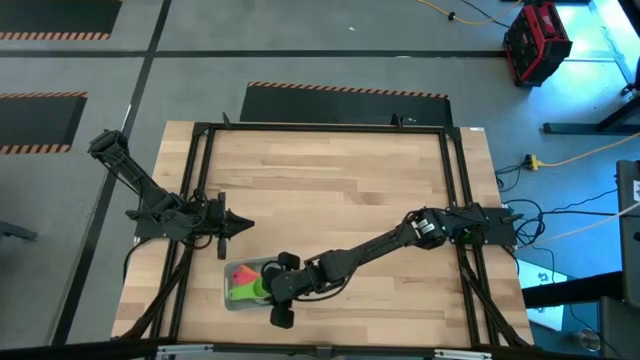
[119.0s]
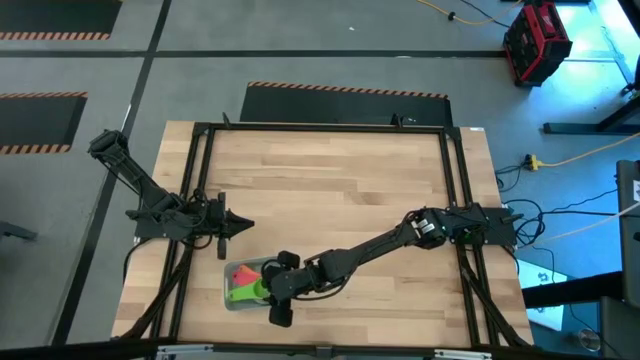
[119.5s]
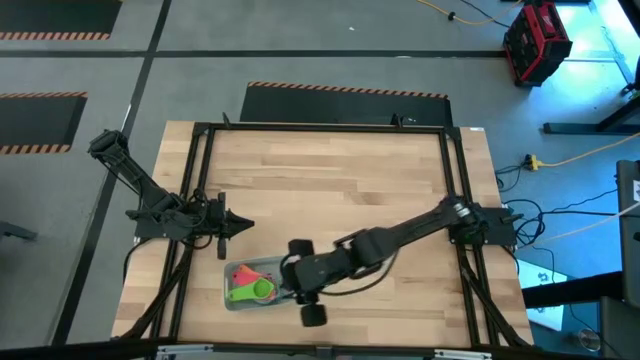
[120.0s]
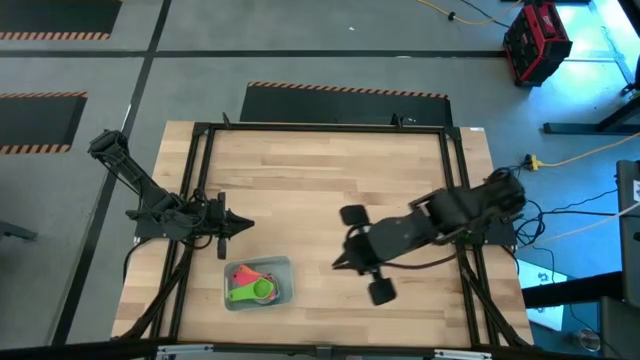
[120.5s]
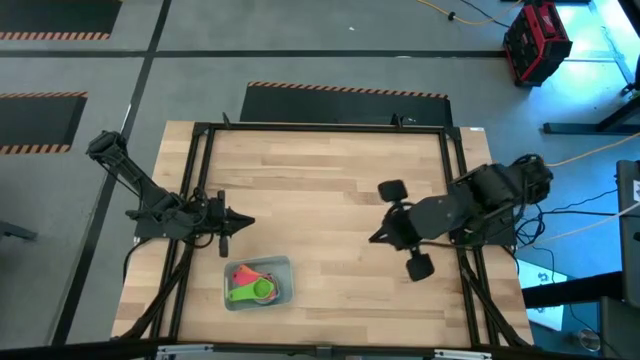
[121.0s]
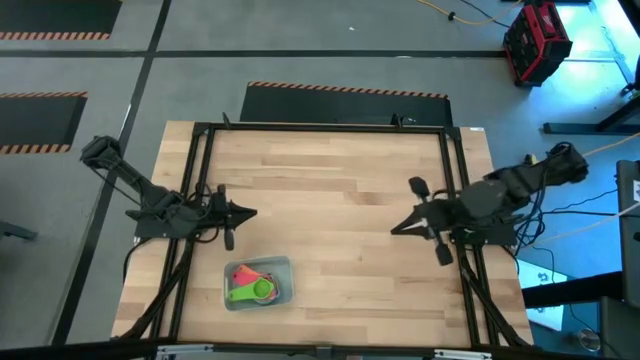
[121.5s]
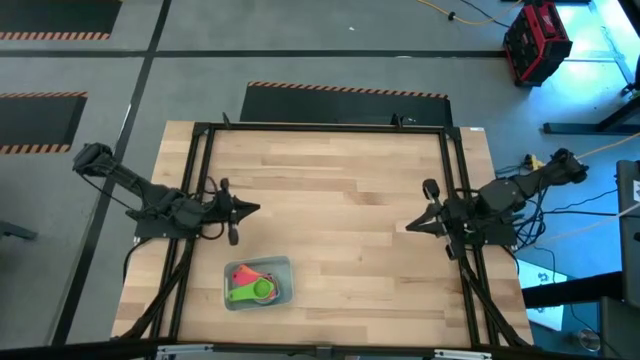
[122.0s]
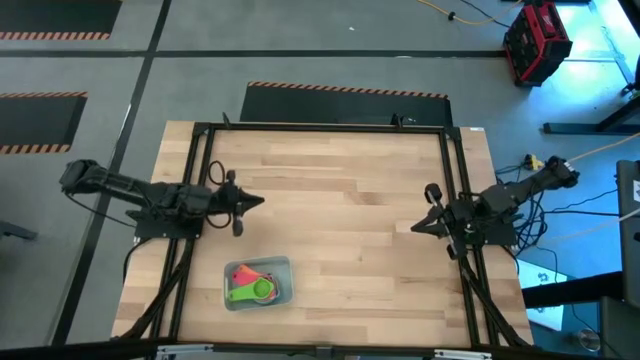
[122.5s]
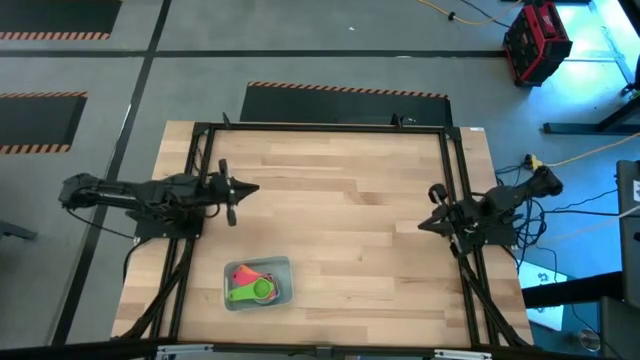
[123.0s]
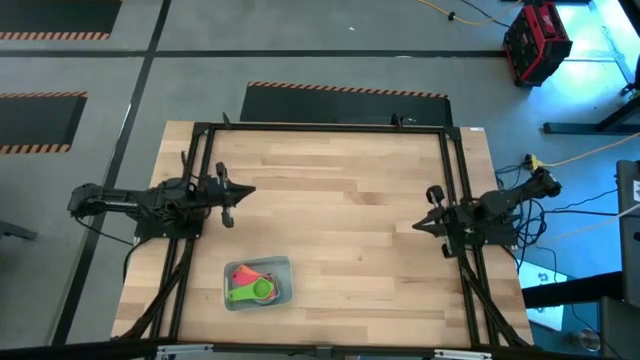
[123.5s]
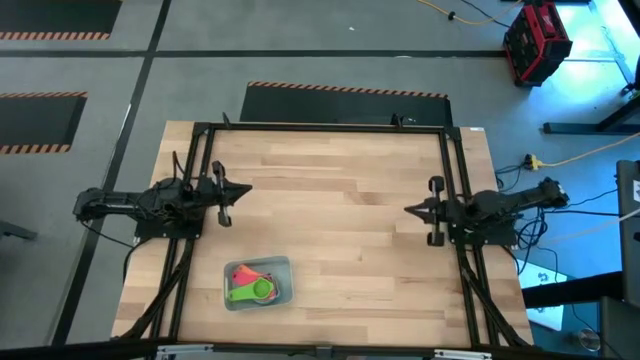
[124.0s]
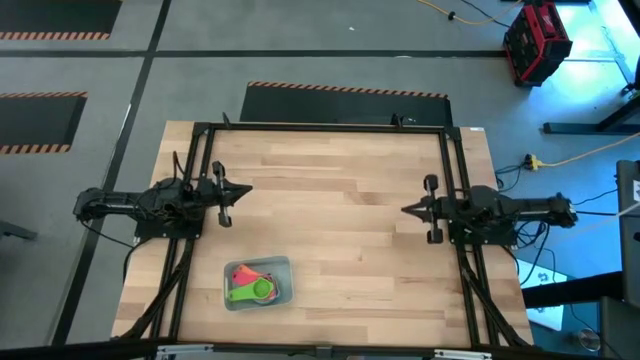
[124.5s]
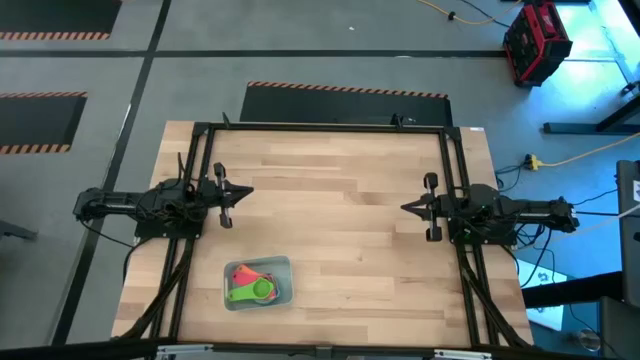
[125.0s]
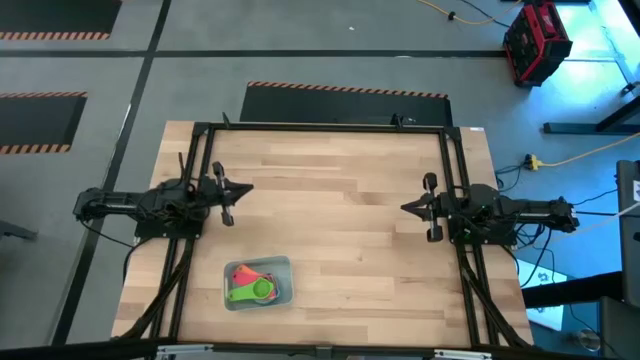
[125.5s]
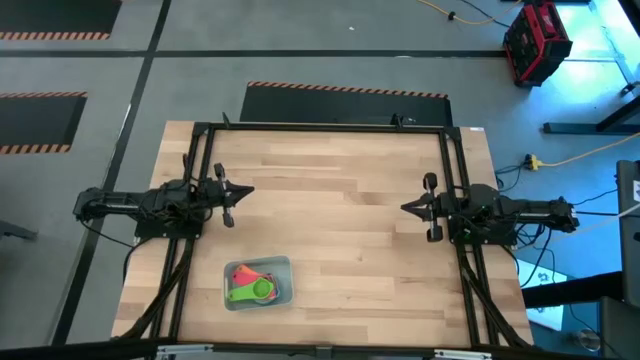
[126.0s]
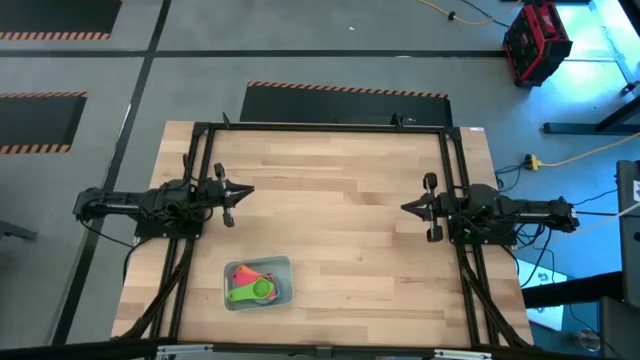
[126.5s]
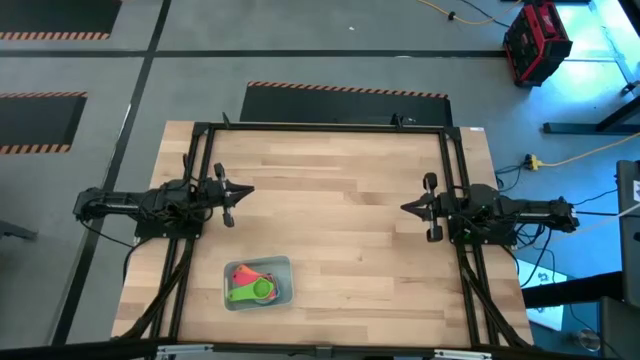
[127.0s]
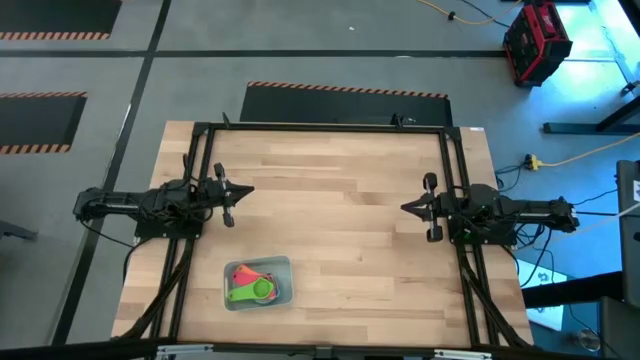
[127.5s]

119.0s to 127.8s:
Task: Nest measuring cups in basket
Return to Home Position

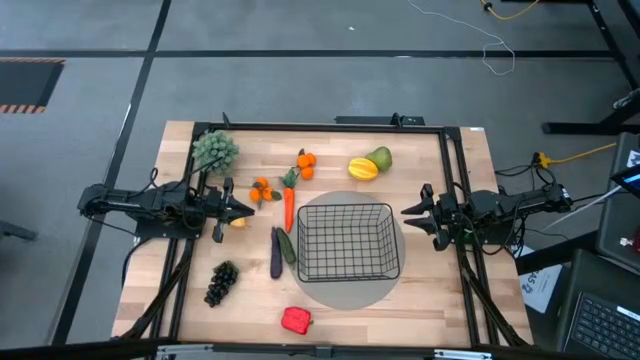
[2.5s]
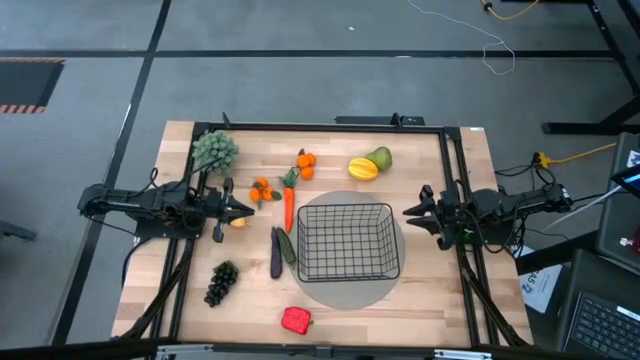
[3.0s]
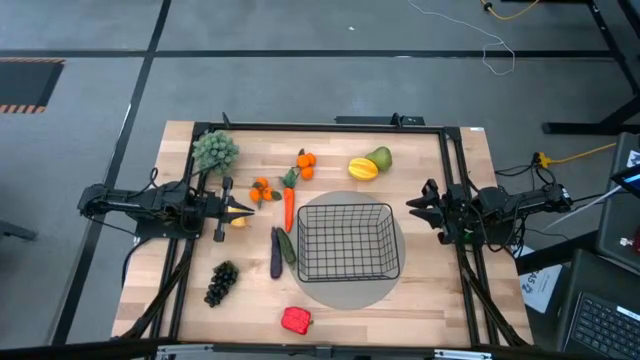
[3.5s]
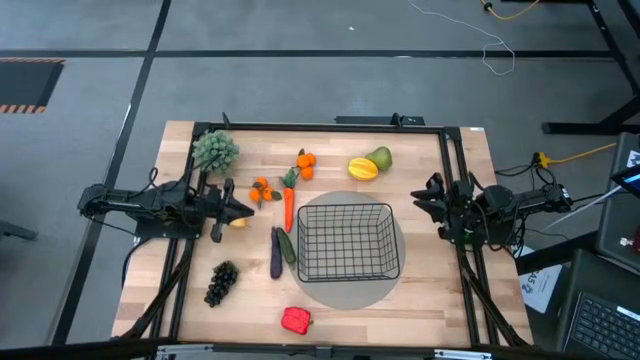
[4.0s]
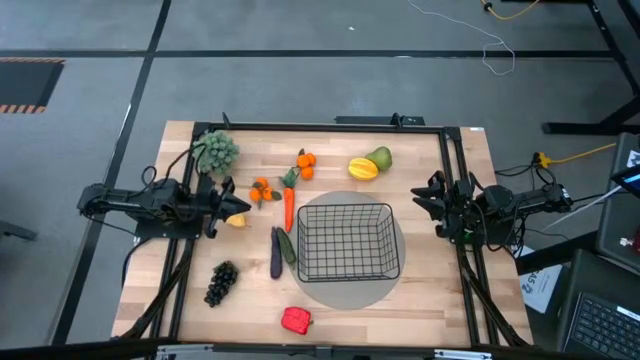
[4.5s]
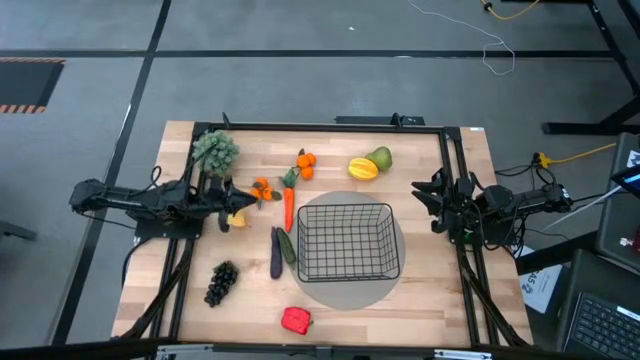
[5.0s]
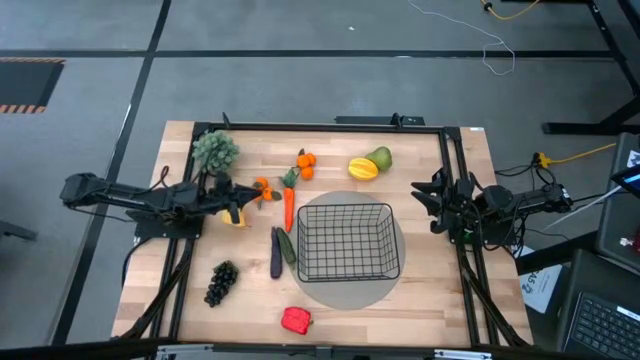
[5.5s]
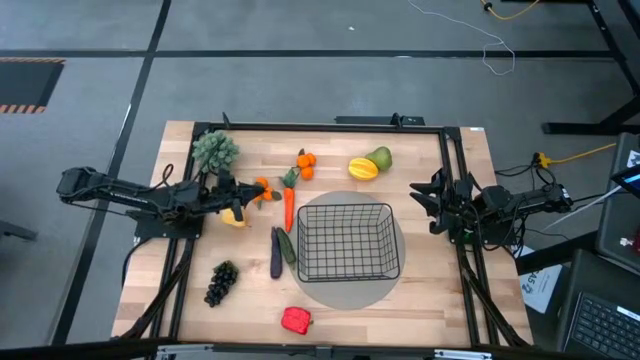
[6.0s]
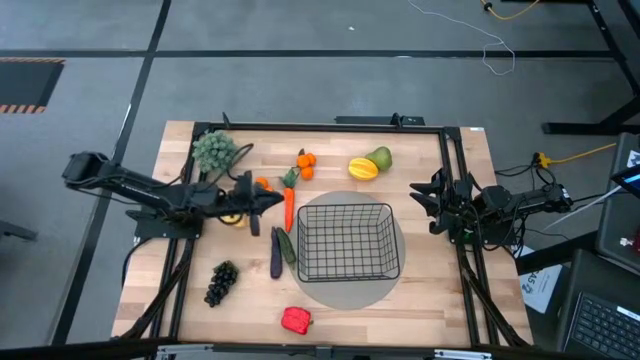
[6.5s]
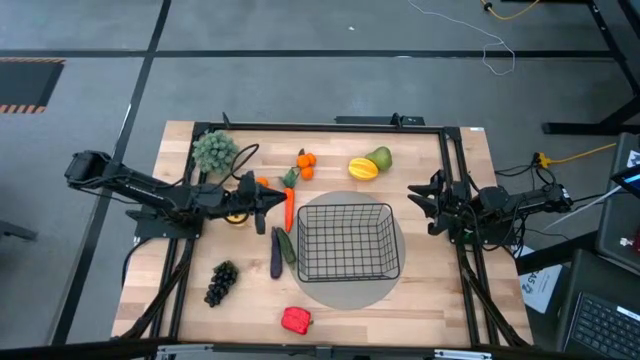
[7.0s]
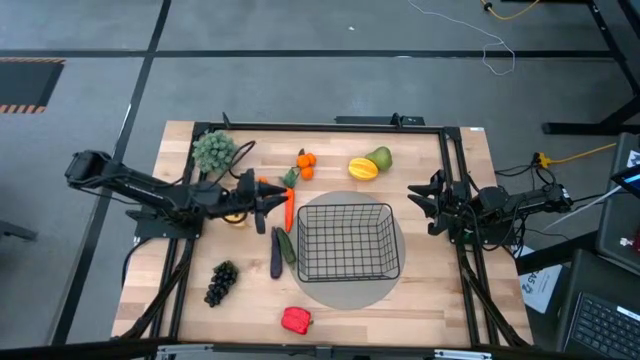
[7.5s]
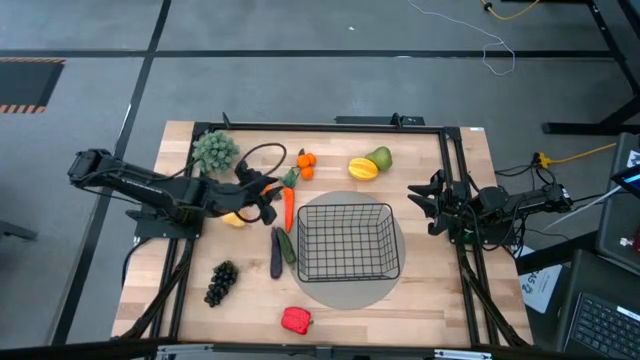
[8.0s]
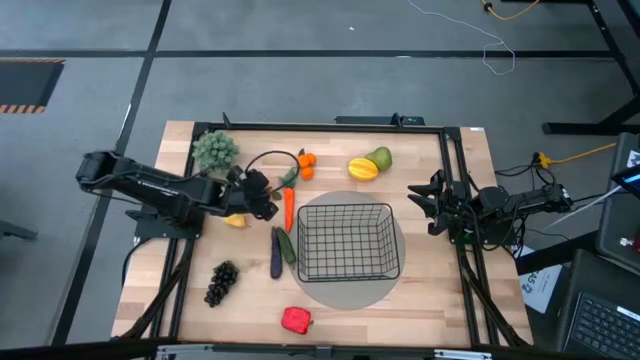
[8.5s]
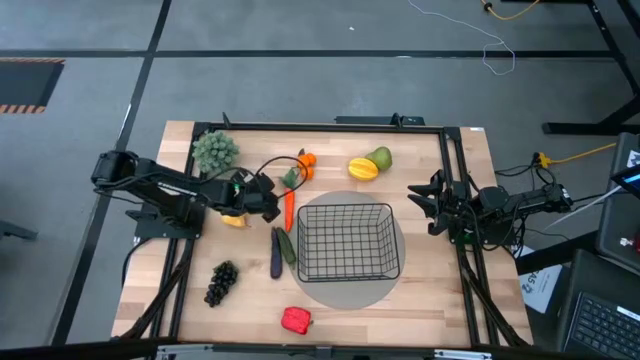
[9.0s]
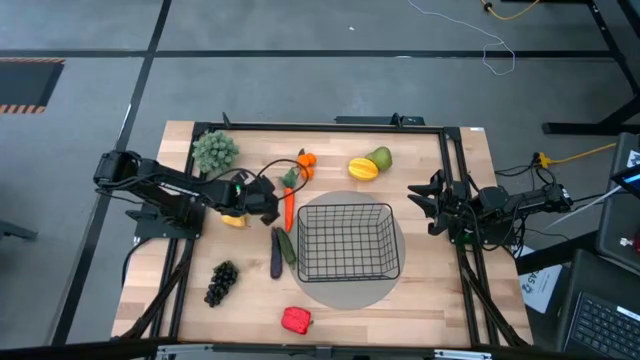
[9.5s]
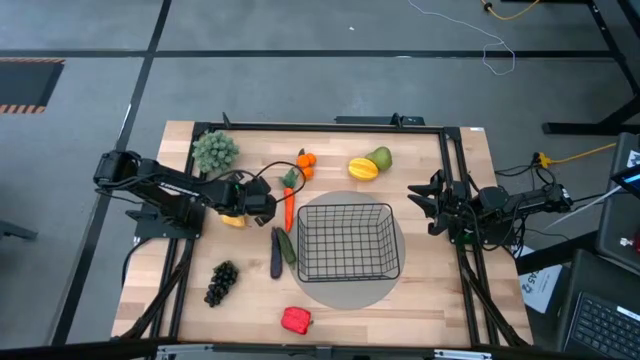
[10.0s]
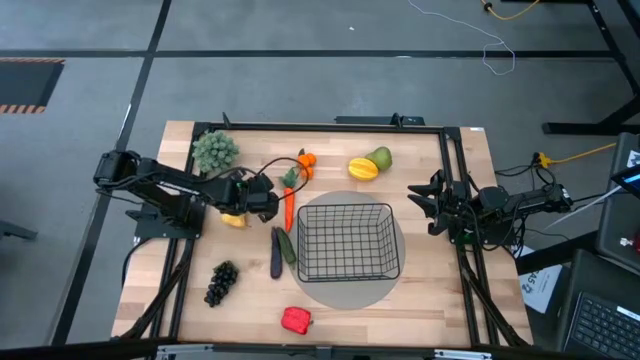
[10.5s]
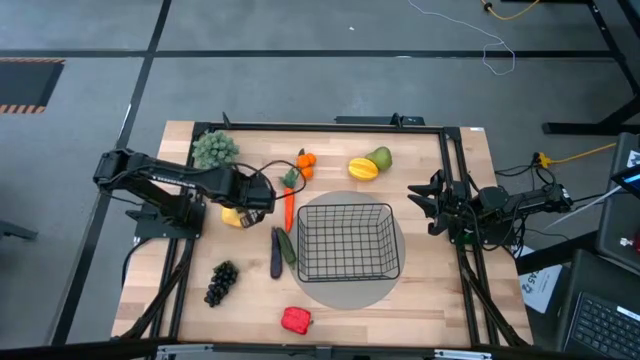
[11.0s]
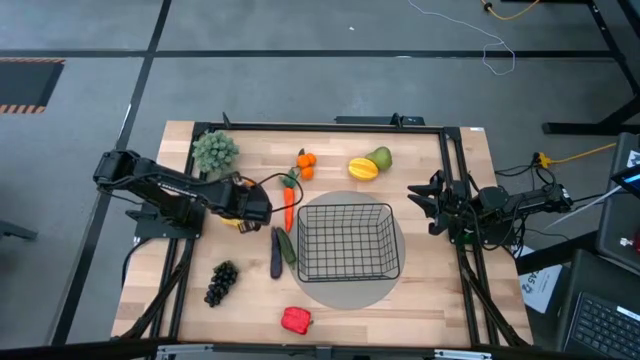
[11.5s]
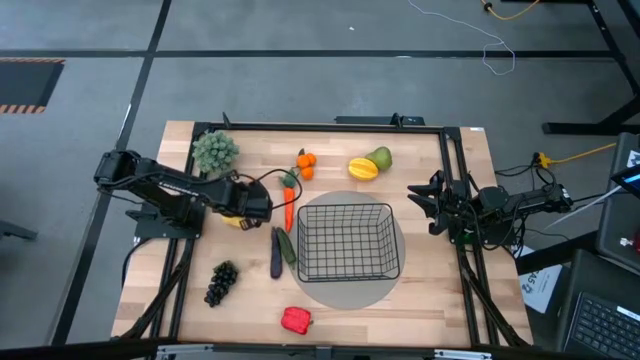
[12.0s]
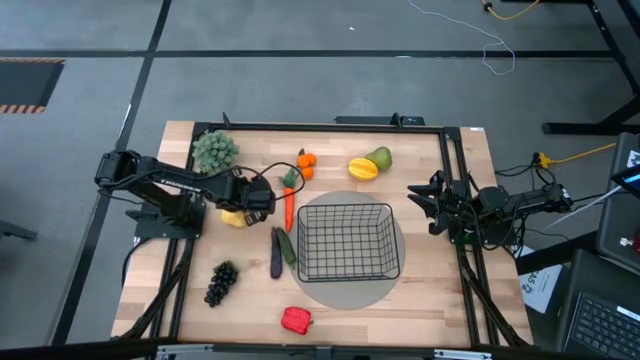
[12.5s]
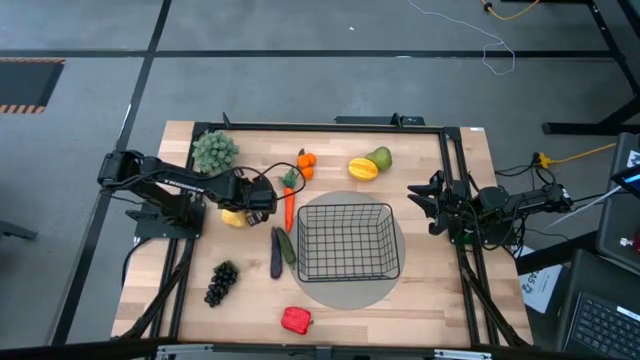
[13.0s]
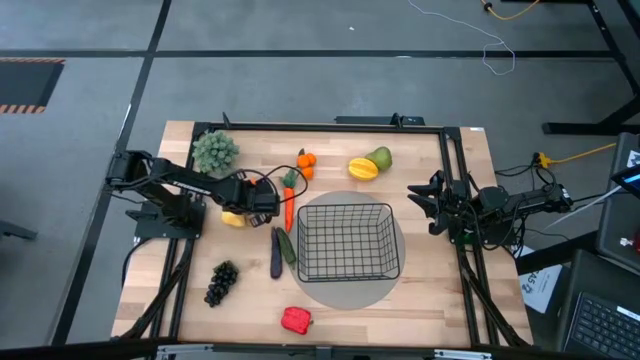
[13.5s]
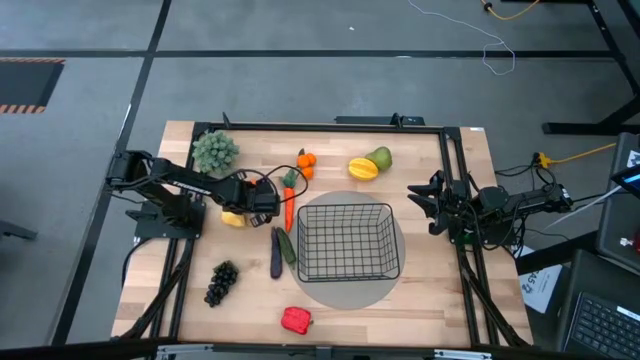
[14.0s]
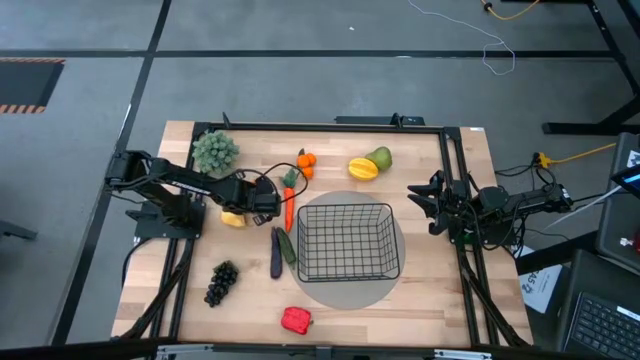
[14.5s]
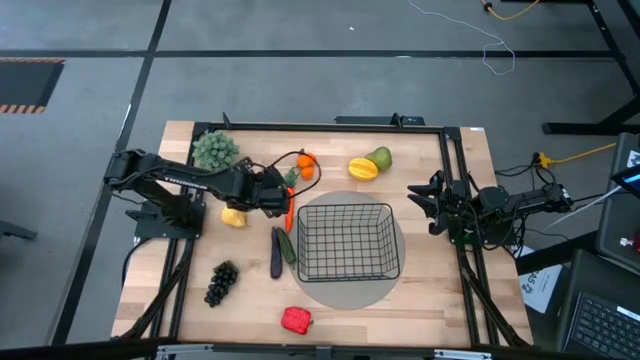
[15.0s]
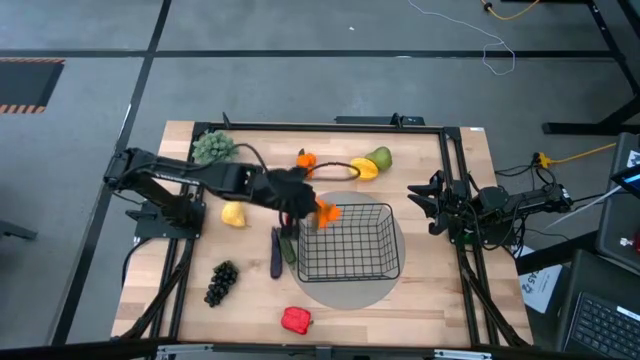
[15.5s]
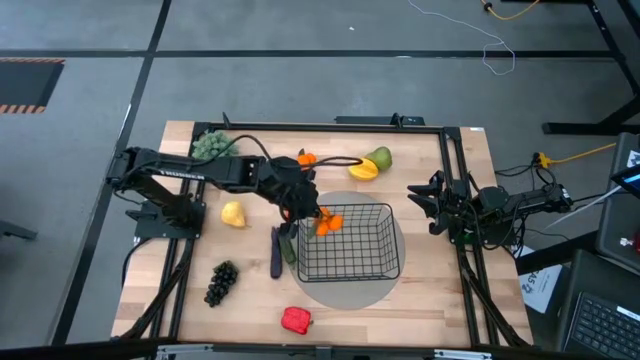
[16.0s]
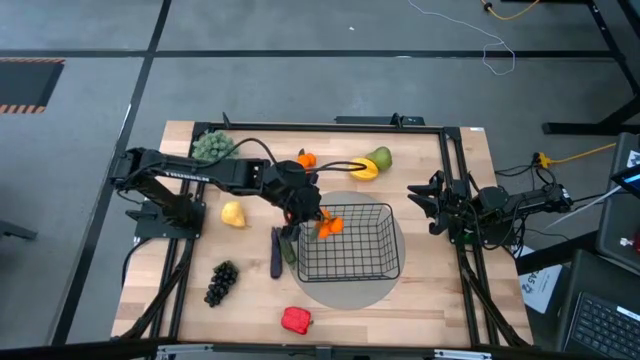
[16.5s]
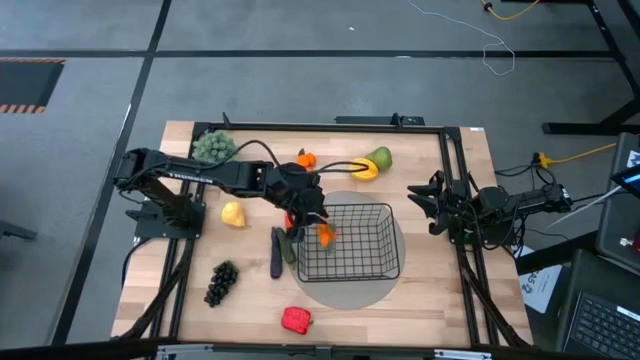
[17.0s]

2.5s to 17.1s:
Task: Build produce basket
Put the left orange tangerine into the black wire basket
